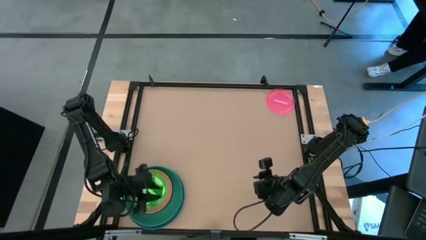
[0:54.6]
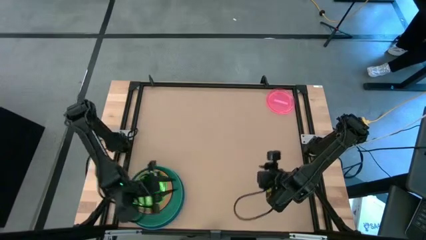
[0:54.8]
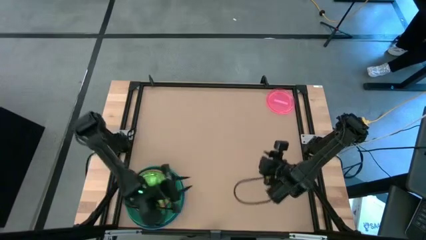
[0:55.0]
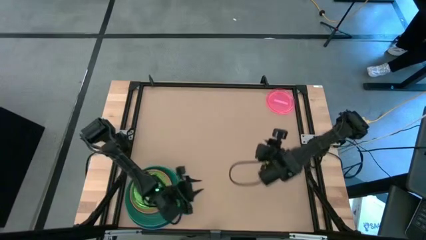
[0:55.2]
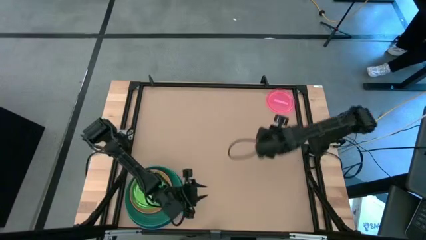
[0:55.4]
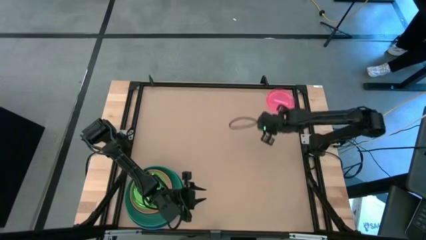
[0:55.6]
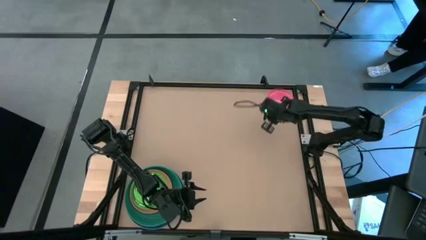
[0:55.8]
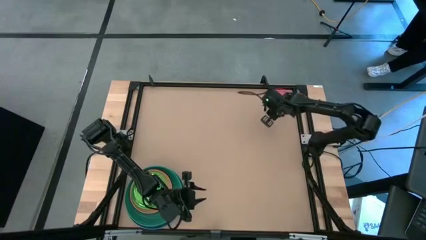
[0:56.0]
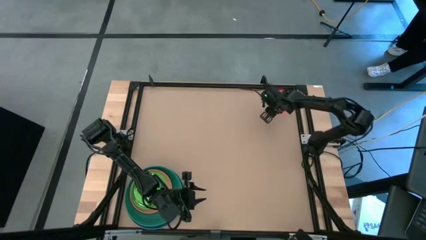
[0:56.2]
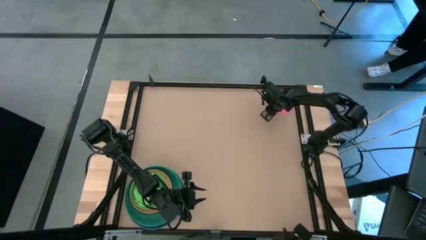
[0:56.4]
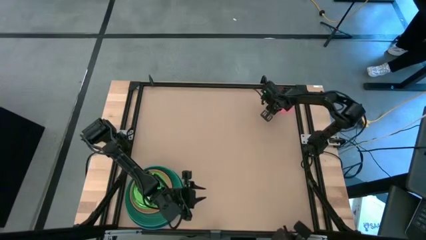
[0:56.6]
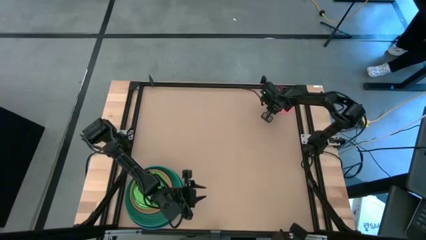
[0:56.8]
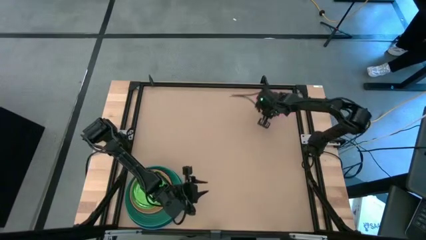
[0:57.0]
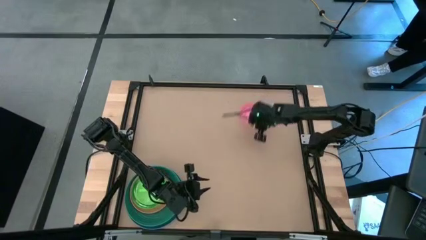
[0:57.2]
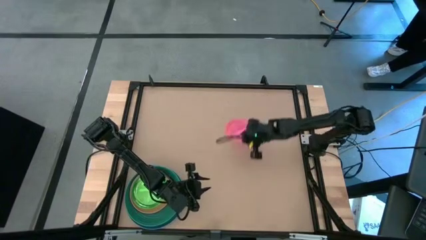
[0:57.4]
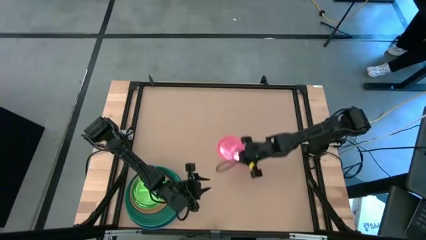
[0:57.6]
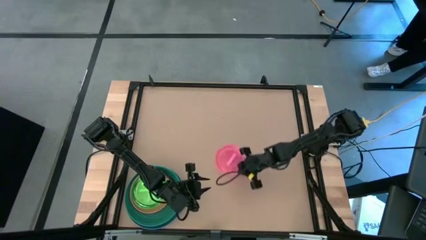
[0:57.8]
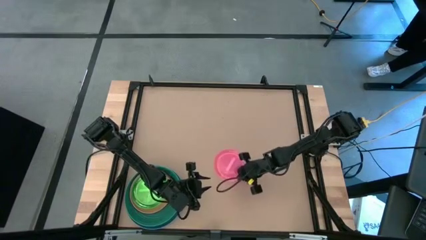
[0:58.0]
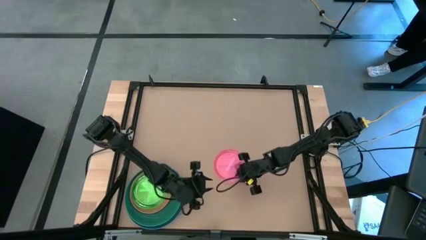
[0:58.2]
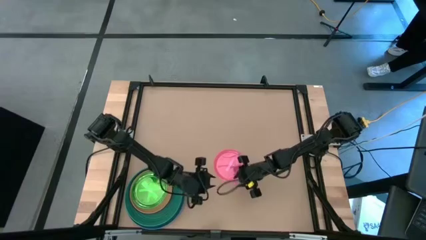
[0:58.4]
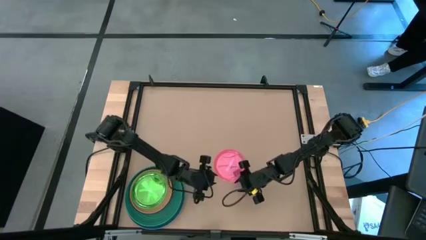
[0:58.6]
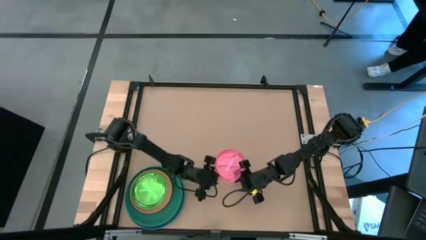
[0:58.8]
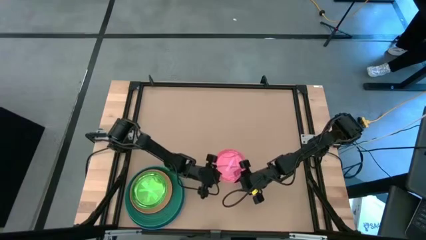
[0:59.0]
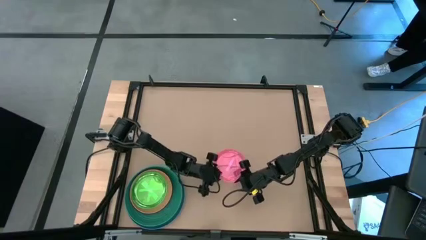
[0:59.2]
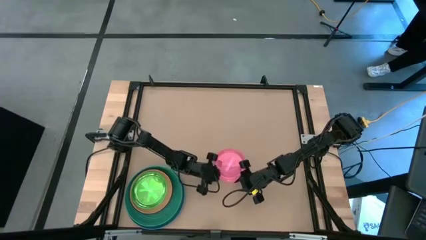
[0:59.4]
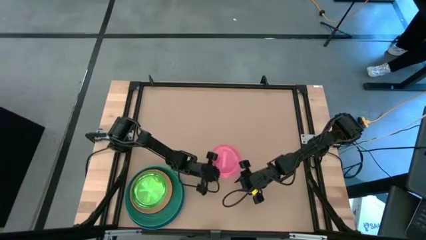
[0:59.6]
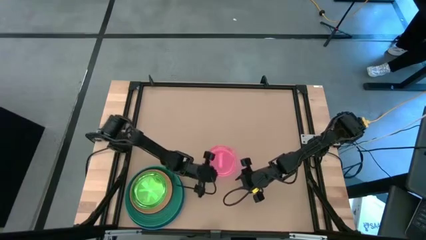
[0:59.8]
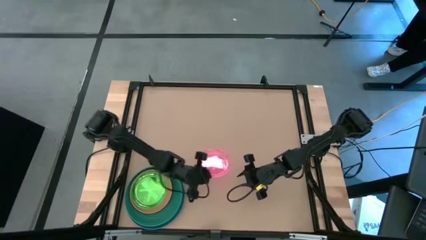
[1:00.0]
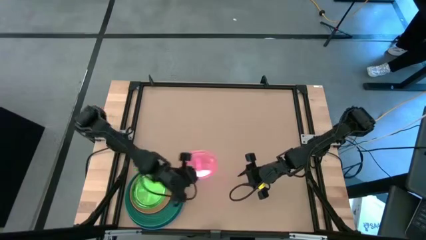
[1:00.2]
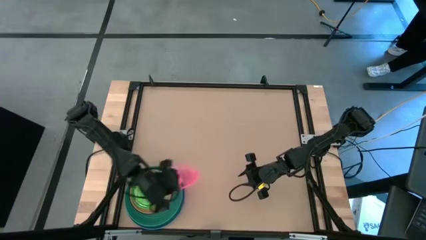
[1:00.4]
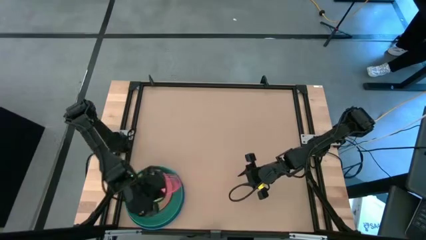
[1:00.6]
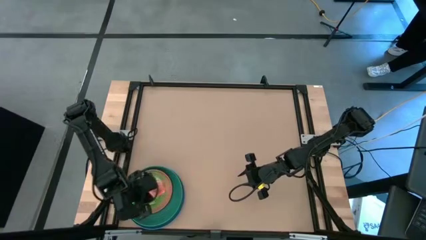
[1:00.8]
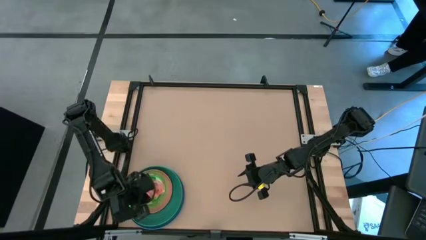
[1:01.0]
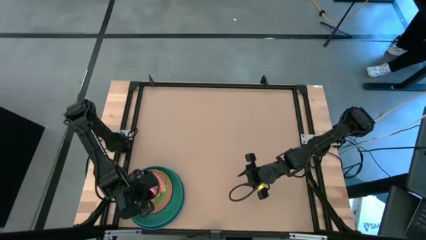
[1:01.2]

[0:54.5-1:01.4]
Task: Stack plastic plates
Stack the pink plate on top of the light green plate

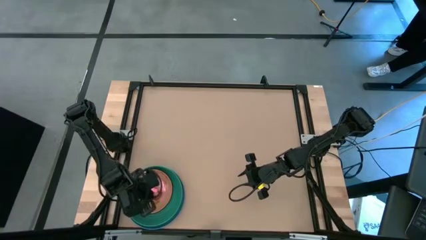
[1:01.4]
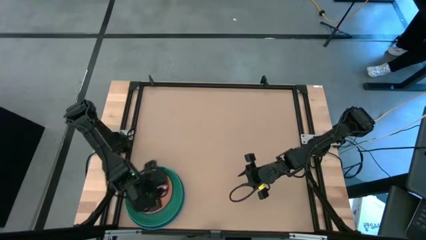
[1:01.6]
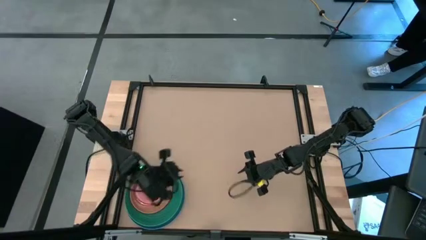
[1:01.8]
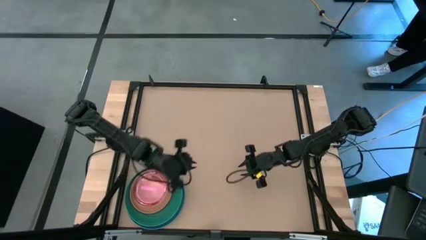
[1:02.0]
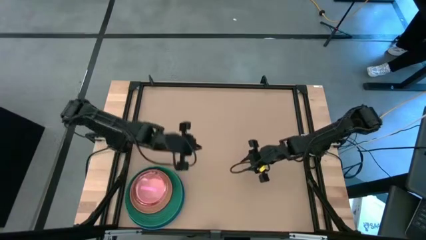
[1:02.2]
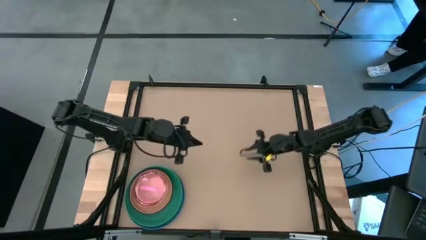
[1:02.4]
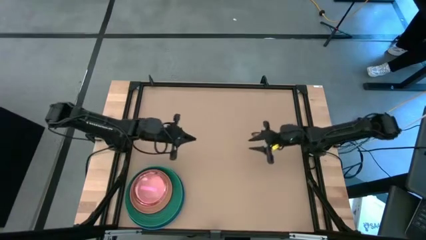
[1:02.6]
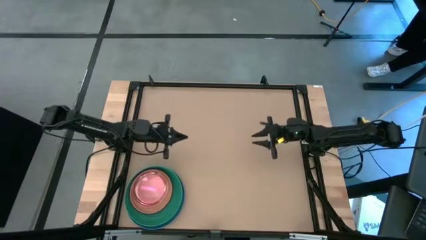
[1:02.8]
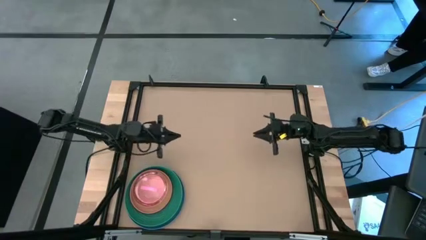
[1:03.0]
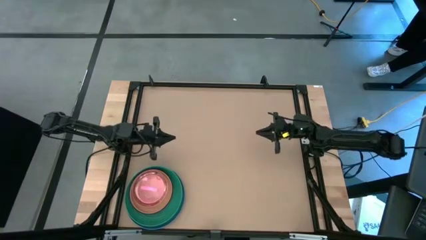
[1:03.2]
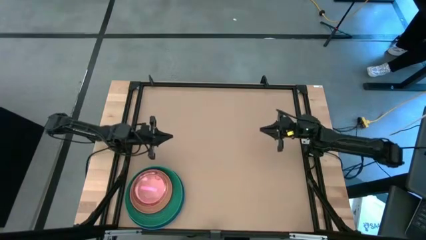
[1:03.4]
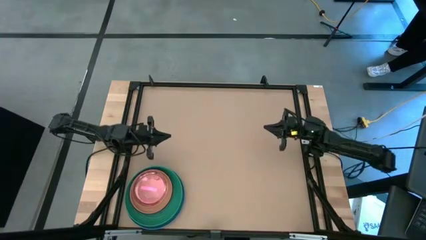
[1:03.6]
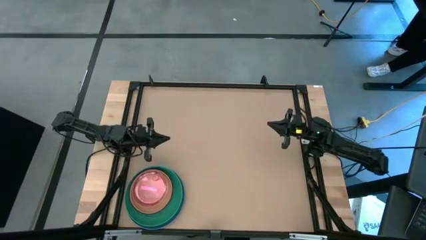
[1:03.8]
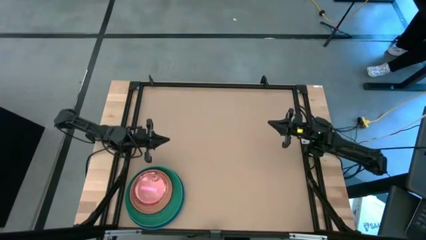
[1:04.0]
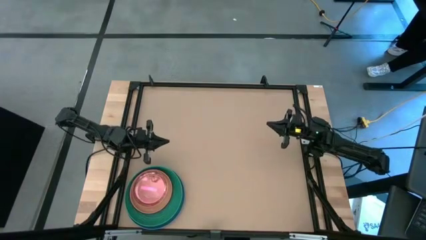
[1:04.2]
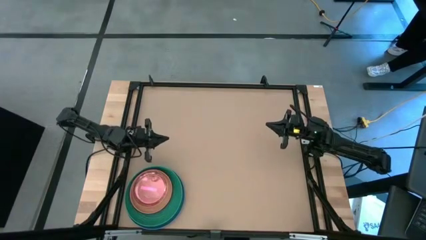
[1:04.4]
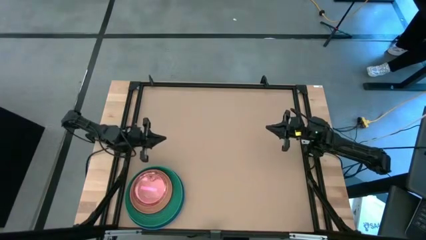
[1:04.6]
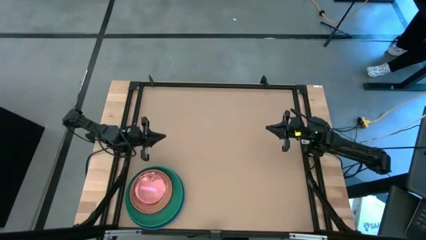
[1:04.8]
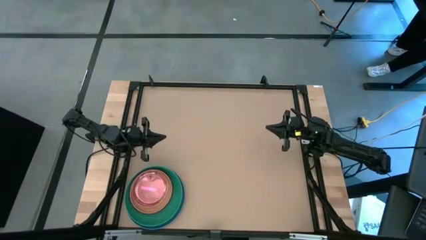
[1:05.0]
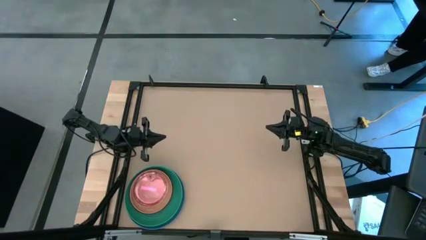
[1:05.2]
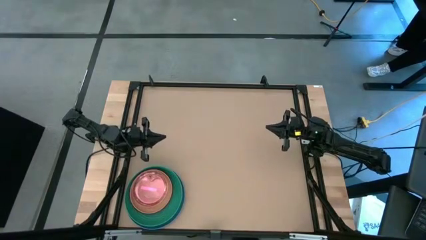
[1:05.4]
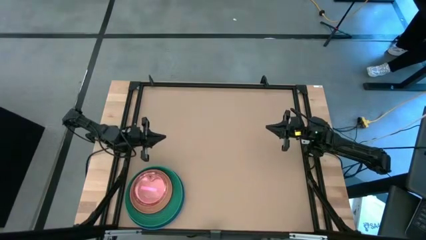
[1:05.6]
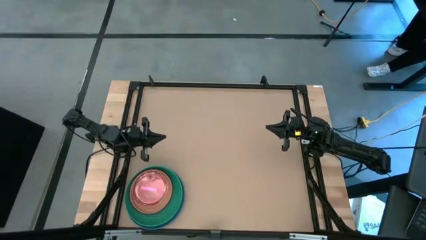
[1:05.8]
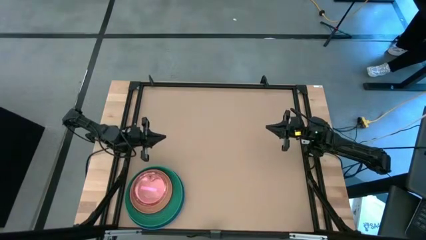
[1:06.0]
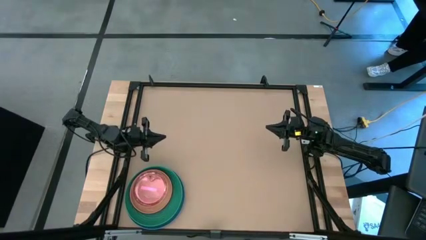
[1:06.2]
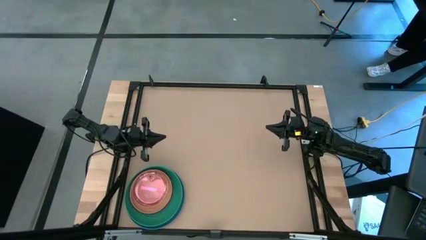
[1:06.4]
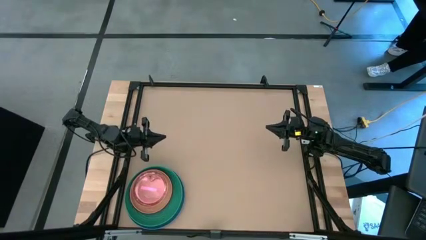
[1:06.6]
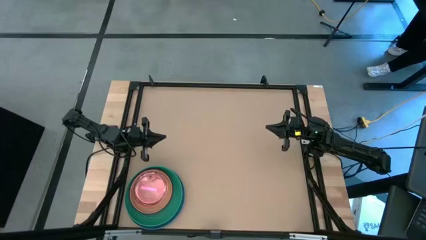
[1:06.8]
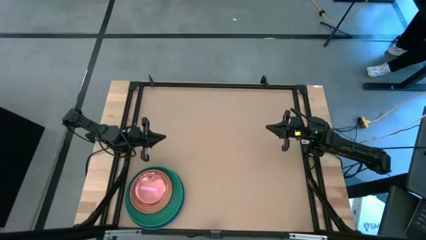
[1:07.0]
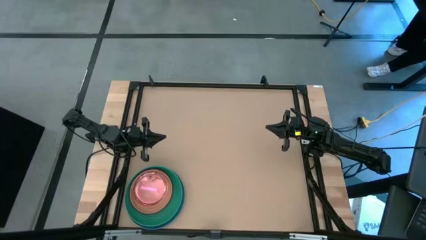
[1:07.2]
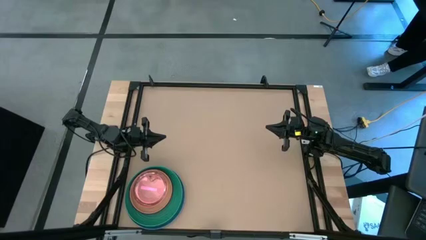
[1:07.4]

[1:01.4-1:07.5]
Return to Home Position

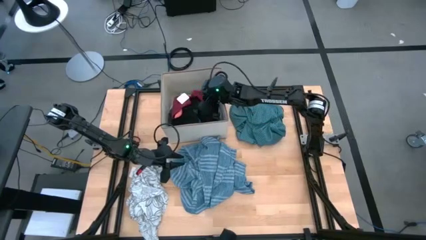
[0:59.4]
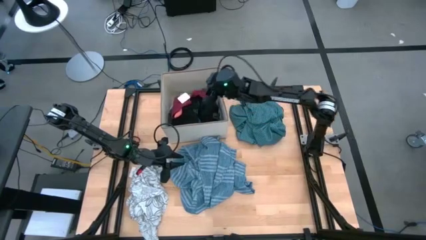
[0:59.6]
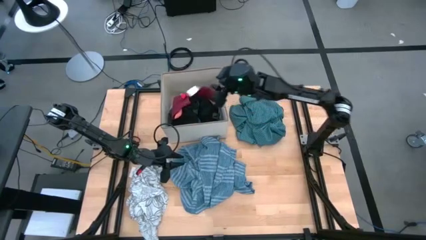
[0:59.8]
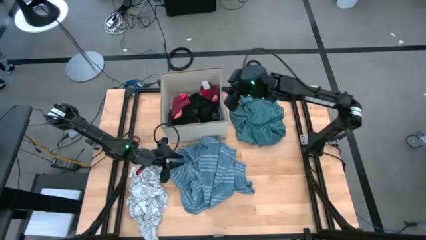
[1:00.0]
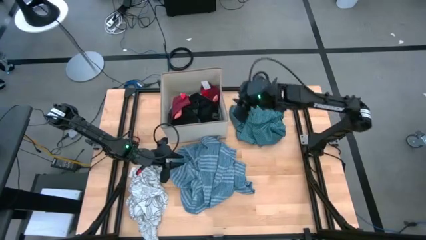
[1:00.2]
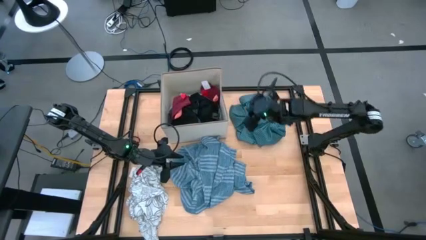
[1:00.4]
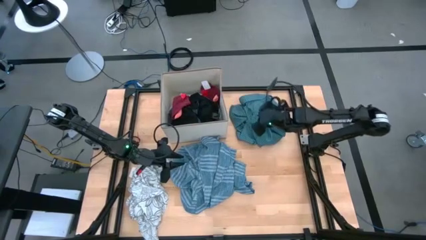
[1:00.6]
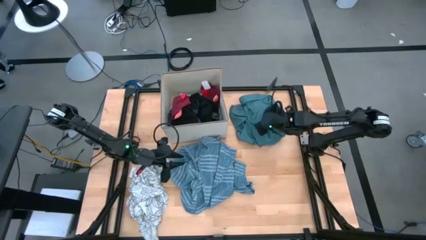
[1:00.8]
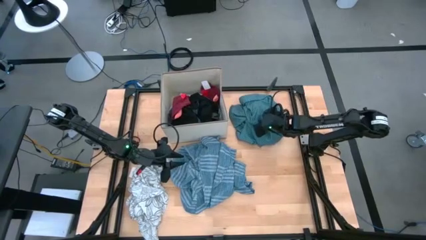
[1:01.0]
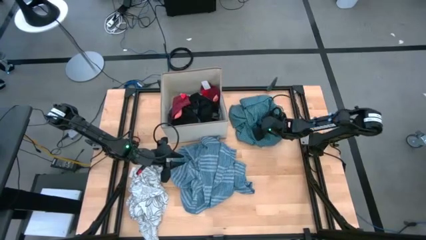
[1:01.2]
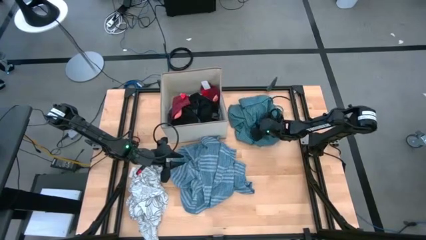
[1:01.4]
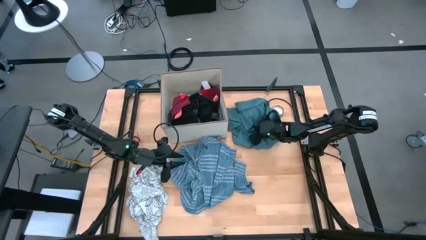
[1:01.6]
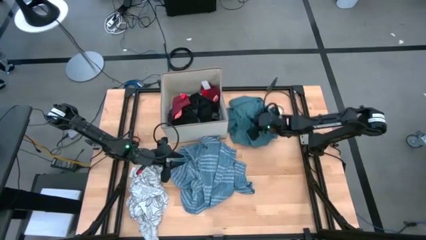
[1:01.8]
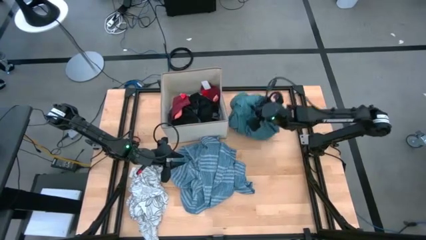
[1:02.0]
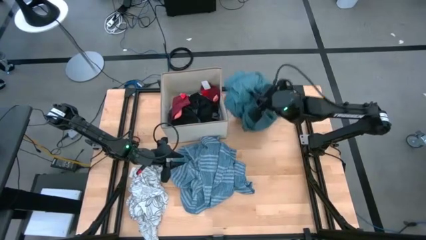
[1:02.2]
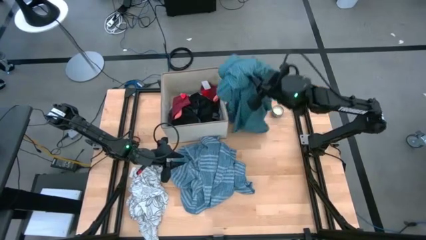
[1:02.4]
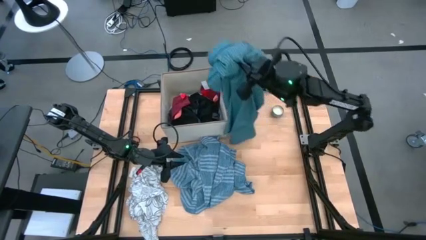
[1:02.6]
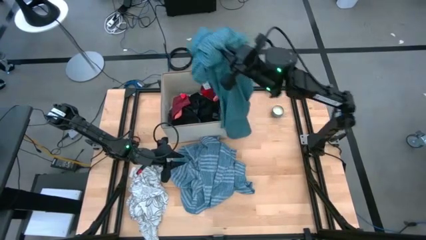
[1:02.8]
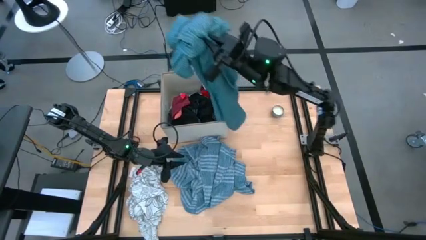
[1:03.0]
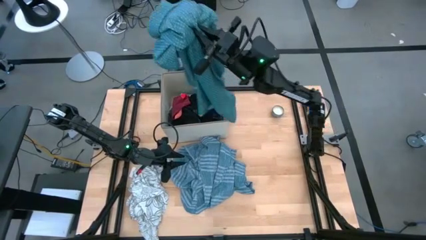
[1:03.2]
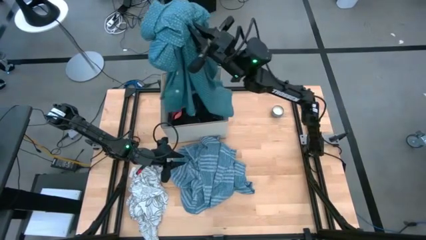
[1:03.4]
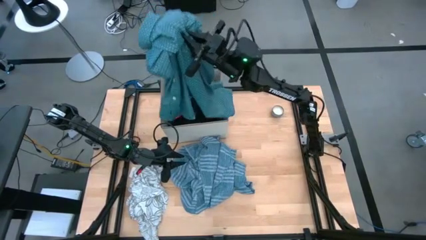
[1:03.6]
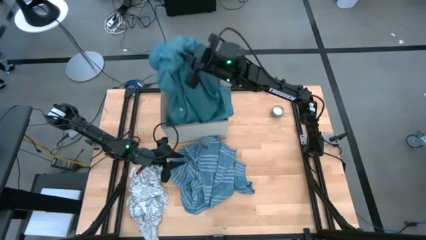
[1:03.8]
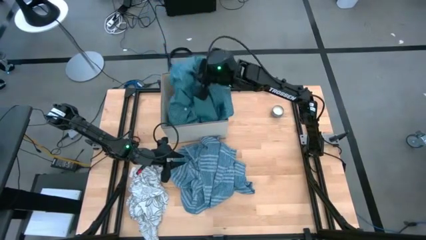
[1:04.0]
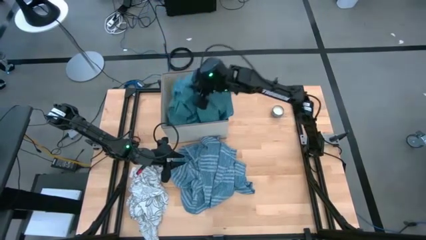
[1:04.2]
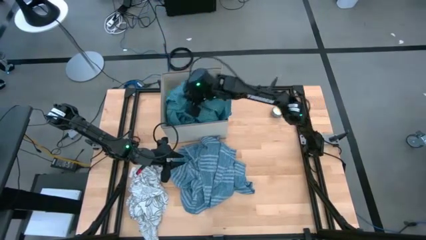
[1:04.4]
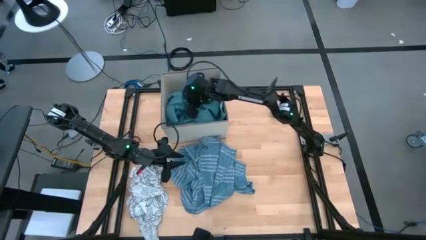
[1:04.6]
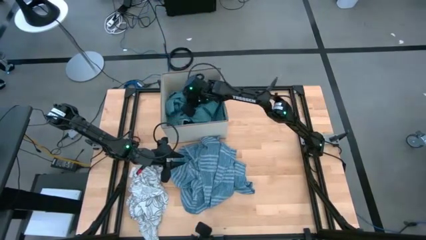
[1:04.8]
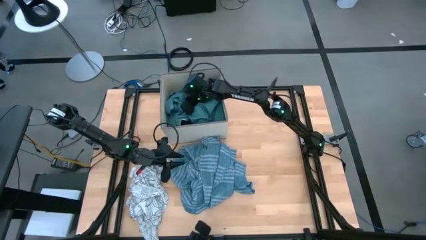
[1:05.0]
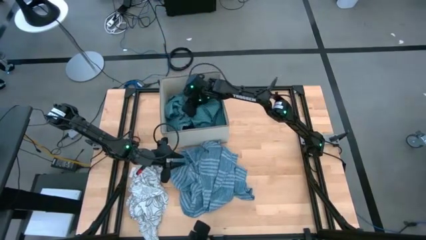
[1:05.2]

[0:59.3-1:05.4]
Task: Sort clothes
Put the green polo shirt into the white laundry organizer
